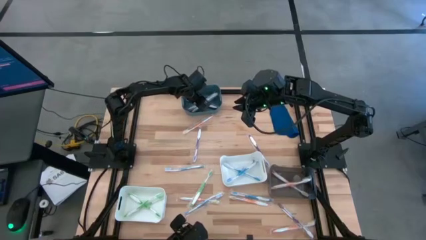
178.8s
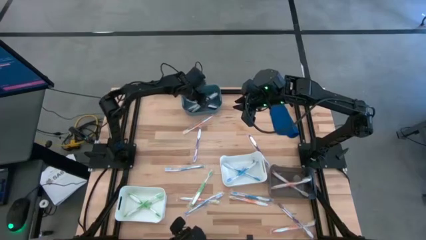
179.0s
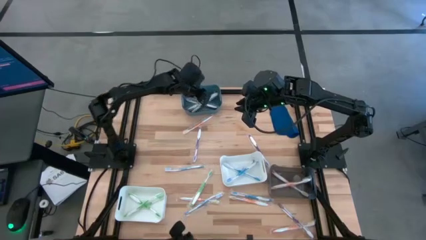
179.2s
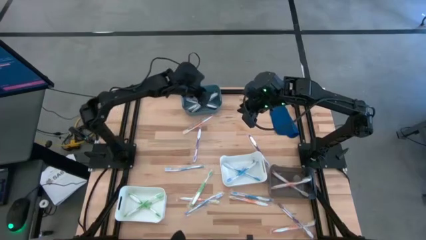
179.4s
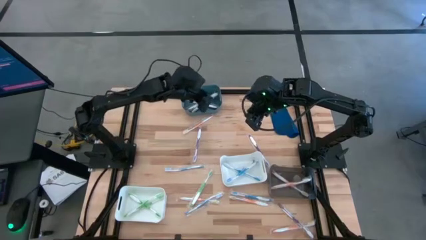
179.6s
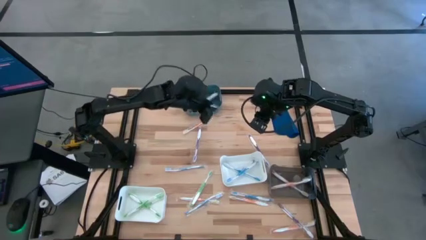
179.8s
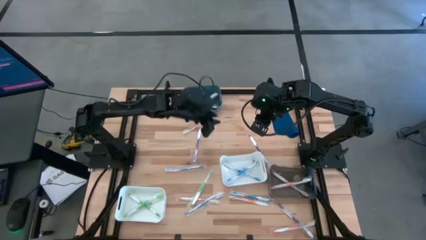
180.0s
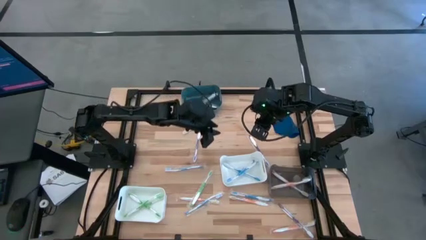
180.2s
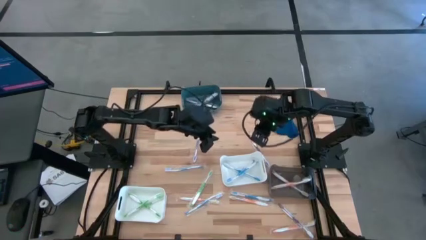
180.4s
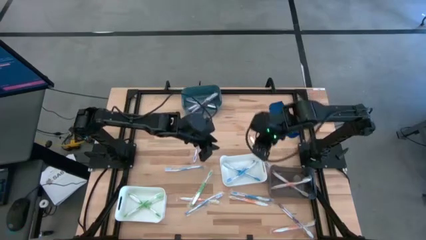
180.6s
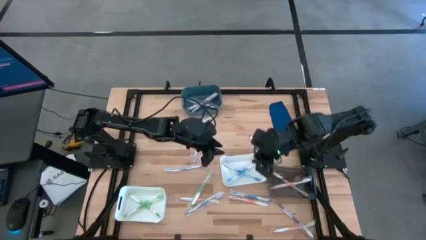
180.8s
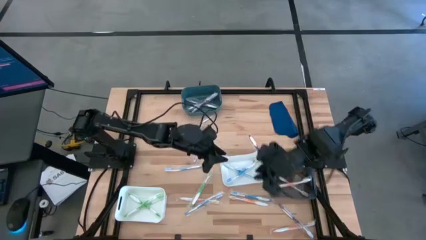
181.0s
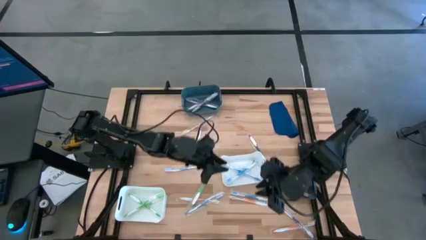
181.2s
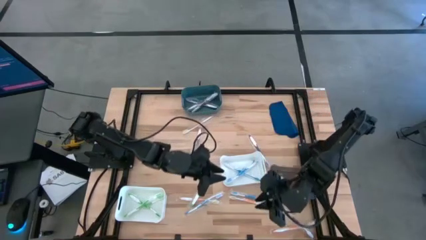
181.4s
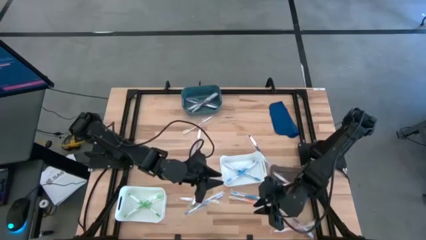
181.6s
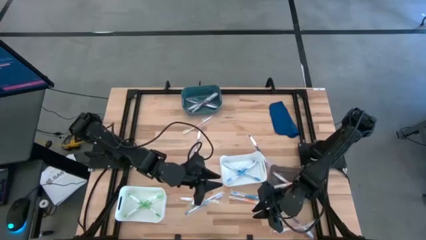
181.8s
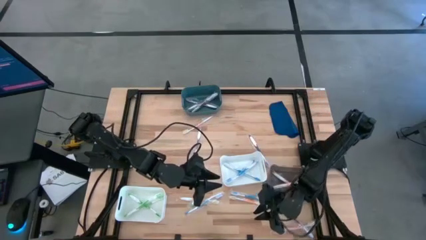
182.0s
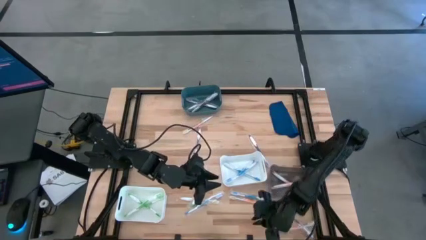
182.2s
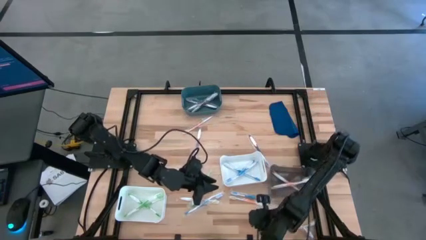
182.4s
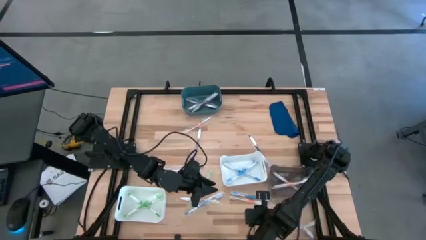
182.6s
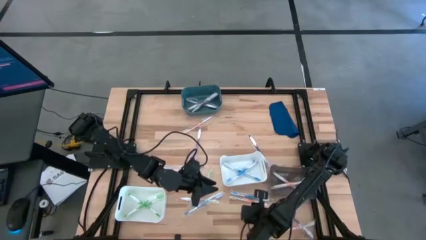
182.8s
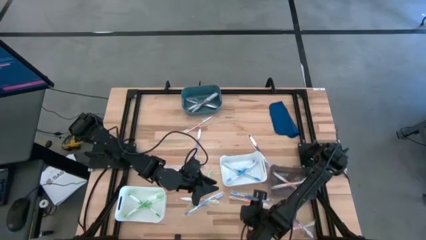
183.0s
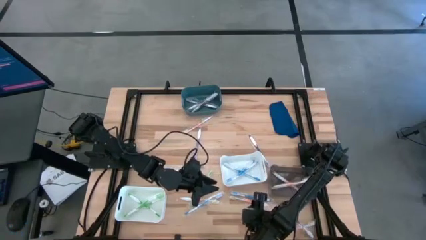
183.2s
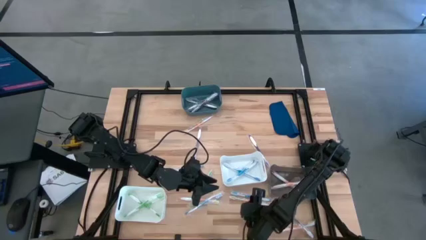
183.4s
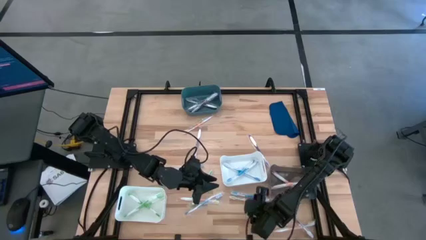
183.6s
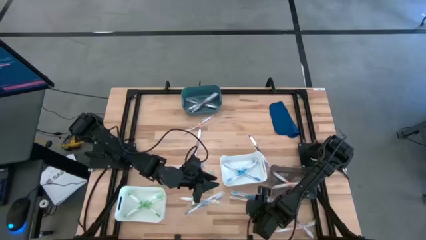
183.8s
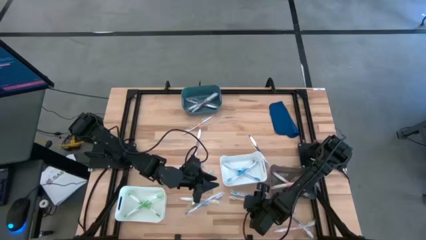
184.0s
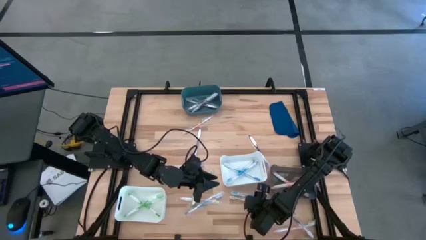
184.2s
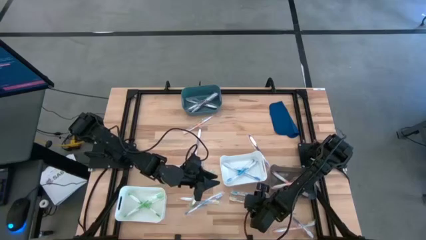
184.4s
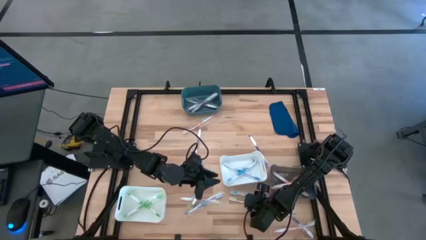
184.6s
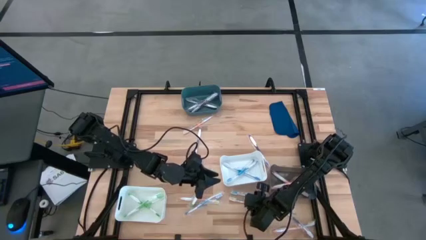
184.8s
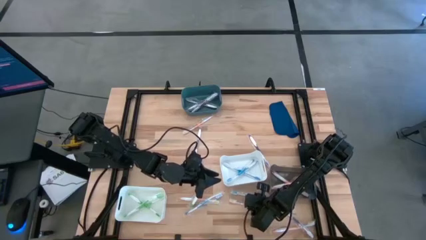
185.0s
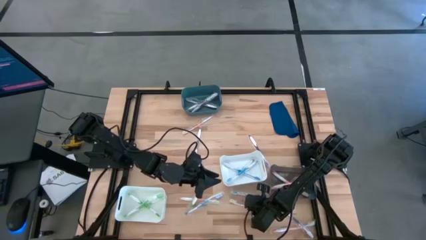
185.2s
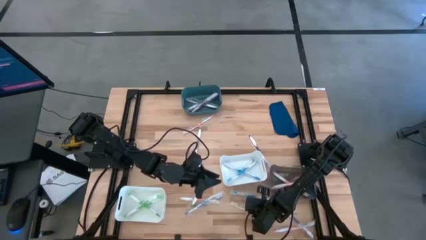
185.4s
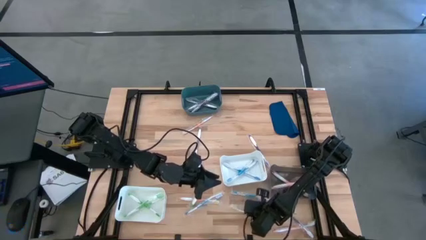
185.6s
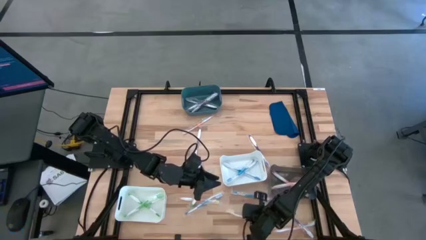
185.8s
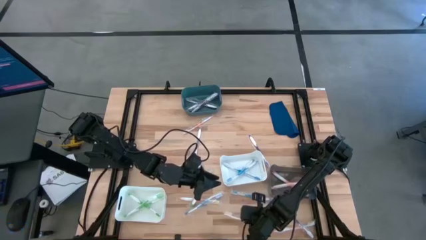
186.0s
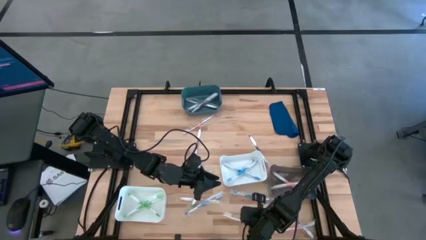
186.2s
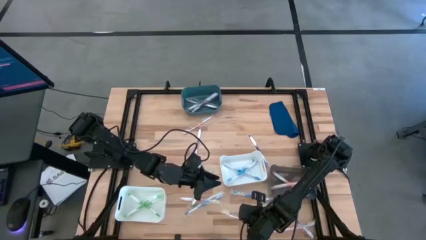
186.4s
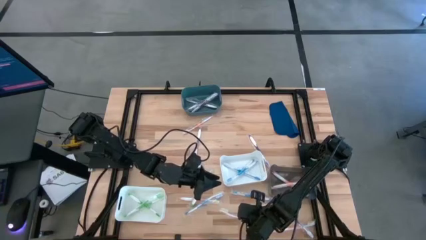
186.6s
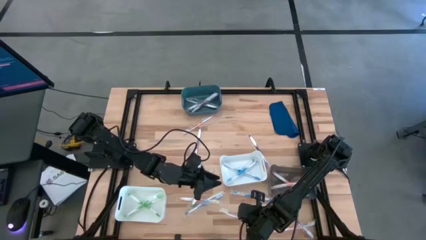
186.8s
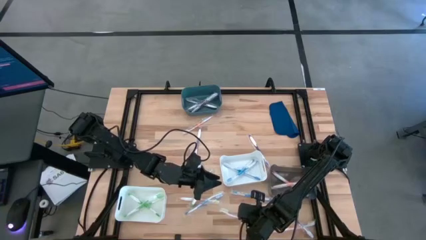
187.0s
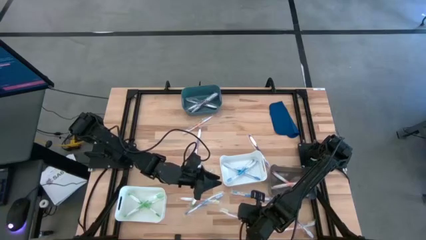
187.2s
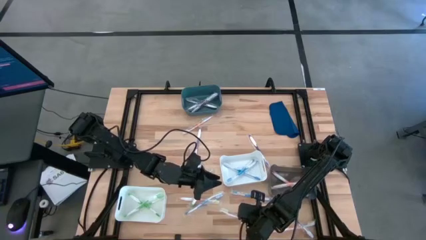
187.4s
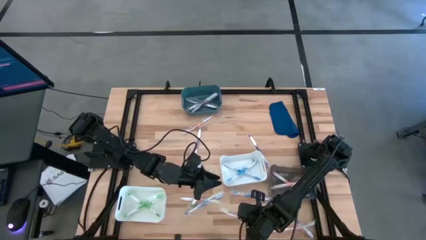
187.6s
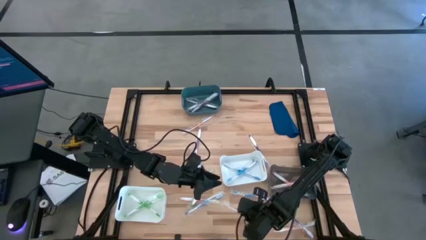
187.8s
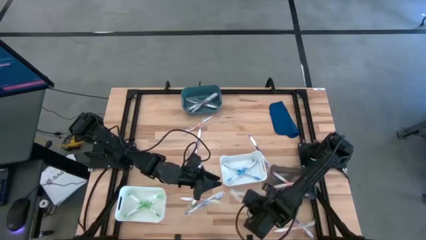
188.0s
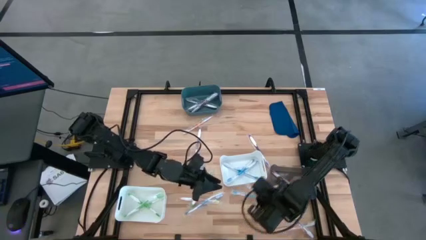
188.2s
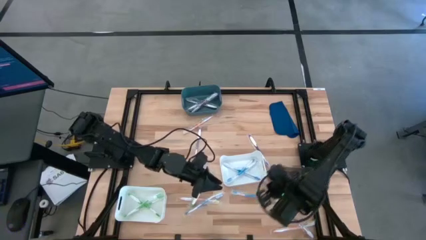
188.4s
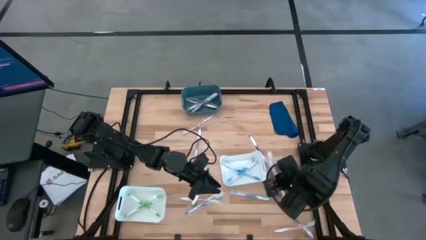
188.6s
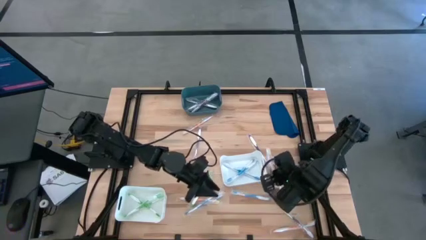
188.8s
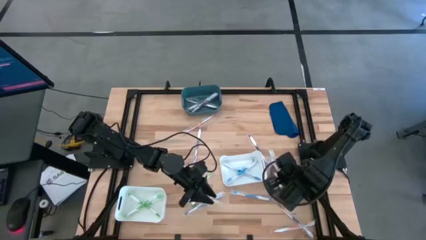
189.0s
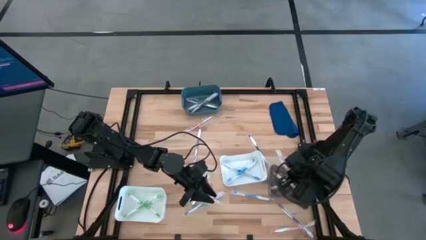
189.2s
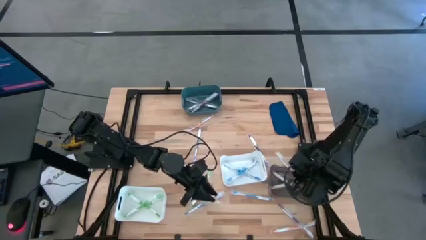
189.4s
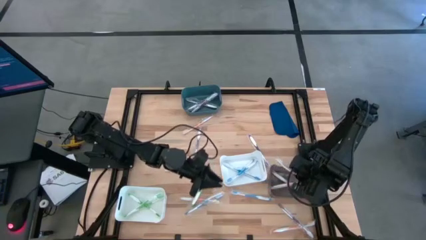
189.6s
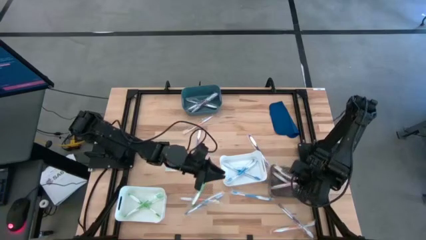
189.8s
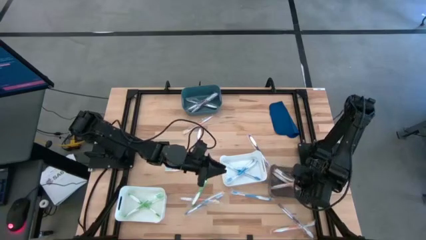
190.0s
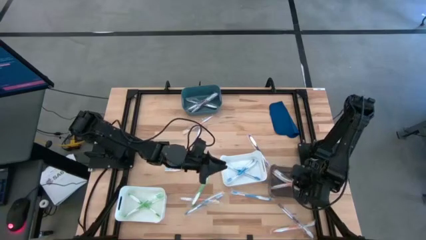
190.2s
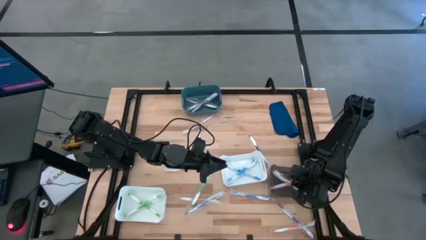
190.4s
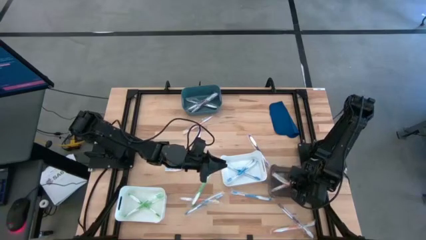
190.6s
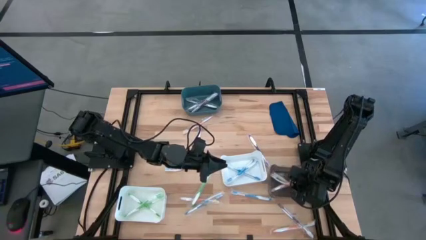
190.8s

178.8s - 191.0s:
Task: Pick & Place Toothbrushes
Put the orange toothbrush into the black bin

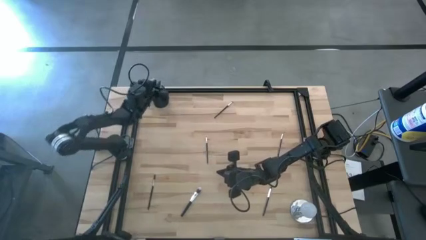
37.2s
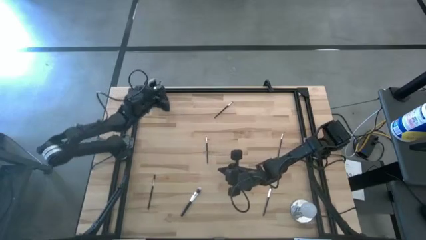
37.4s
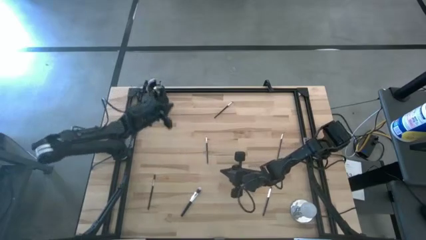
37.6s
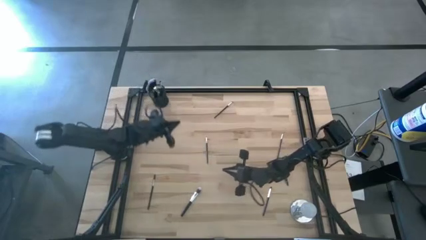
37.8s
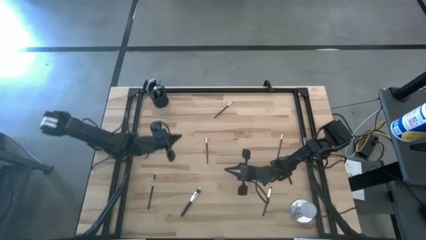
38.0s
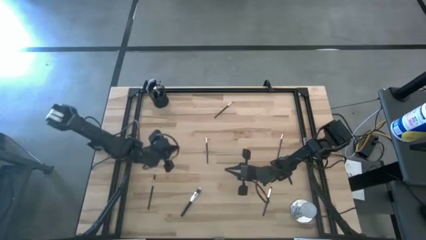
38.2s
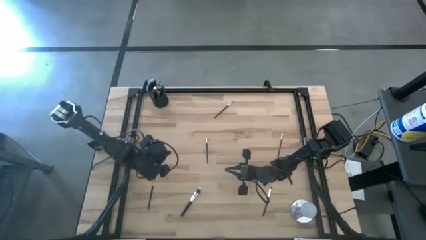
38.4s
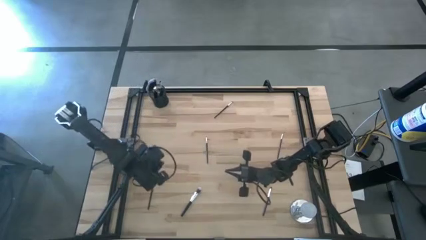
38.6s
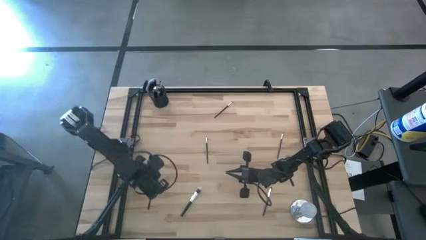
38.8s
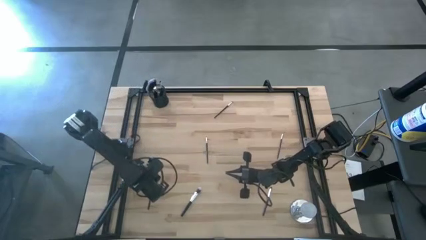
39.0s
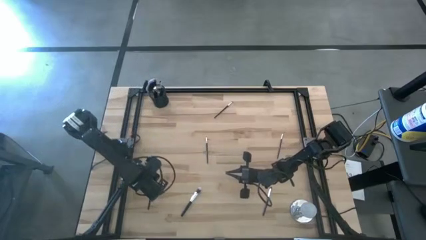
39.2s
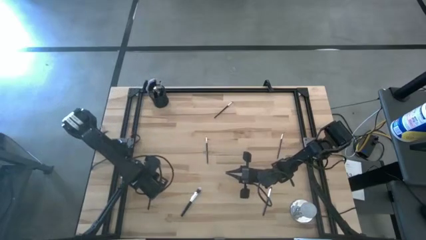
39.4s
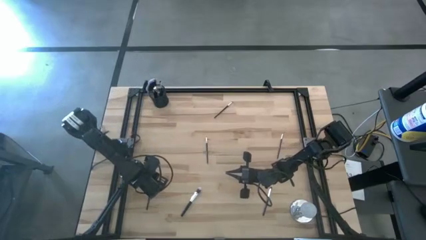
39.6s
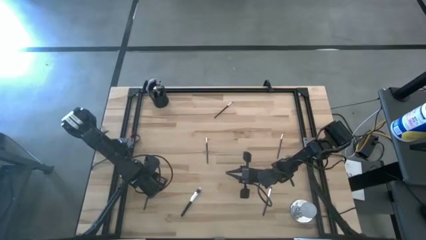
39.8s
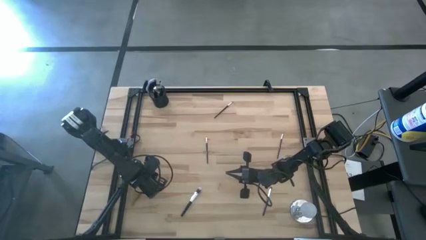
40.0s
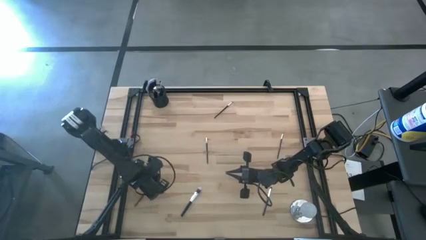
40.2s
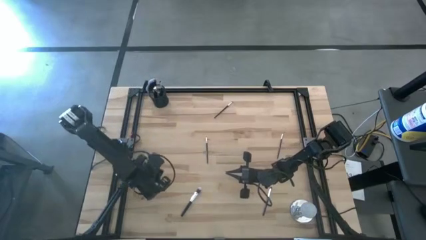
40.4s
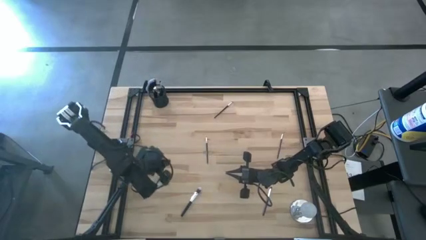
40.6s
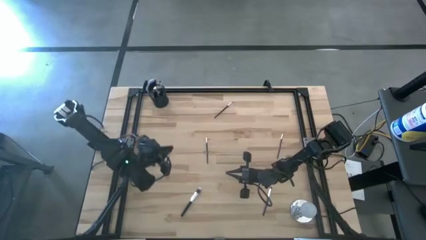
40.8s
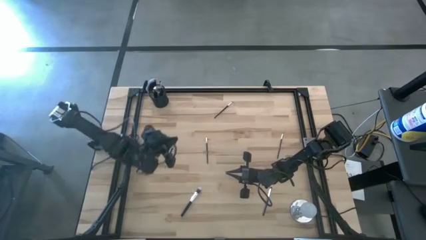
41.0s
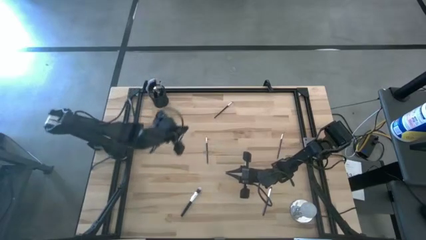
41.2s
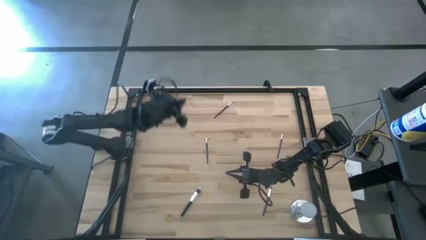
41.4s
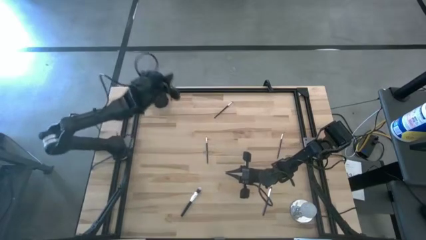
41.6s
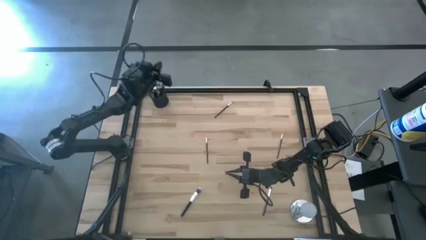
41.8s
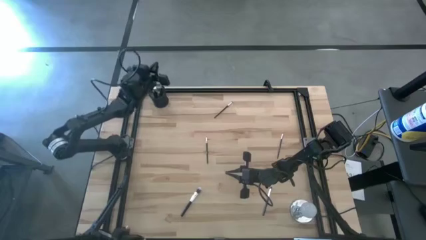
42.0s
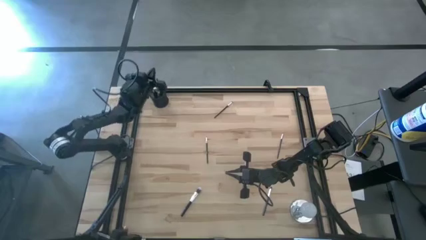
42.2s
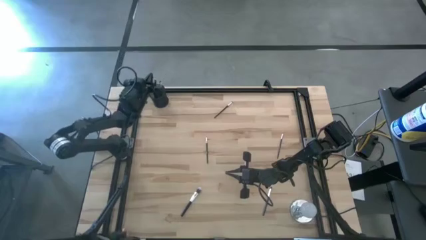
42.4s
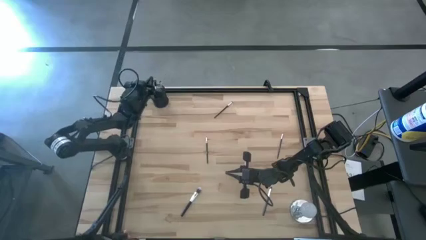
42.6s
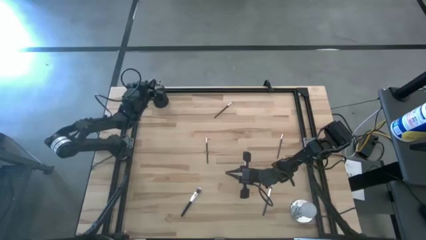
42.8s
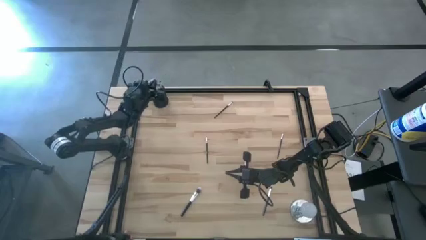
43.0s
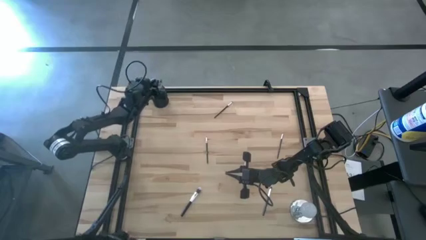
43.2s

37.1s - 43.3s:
Task: Put items in baskets/containers
Put the lash brush into the holder
